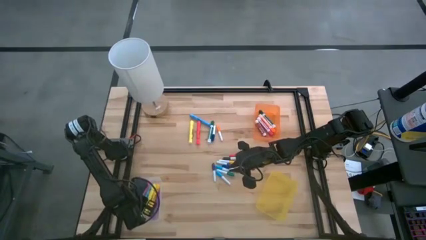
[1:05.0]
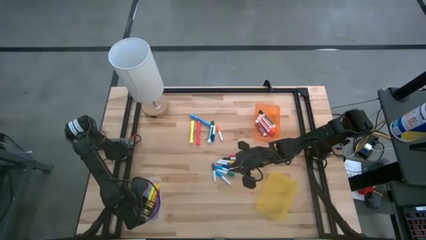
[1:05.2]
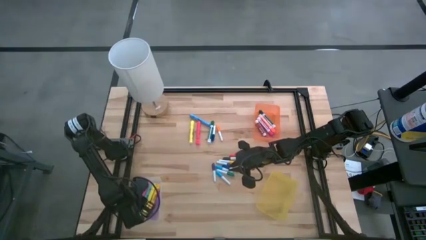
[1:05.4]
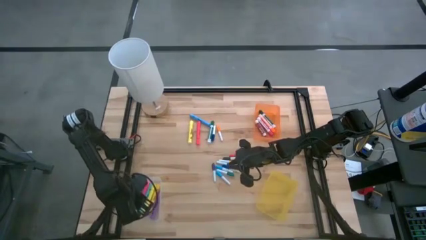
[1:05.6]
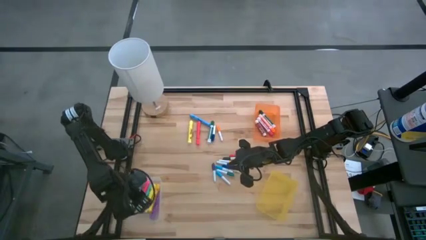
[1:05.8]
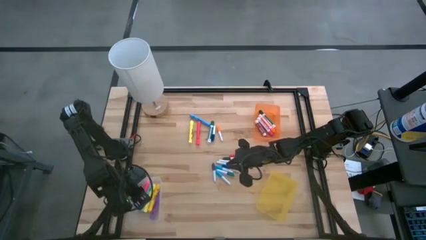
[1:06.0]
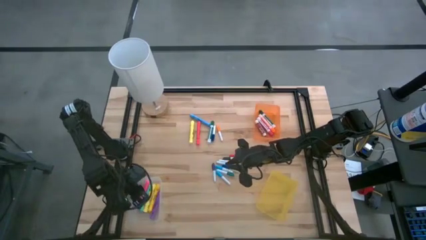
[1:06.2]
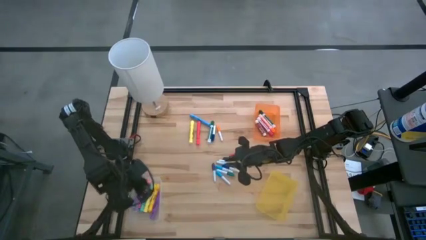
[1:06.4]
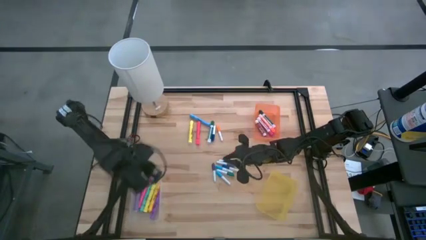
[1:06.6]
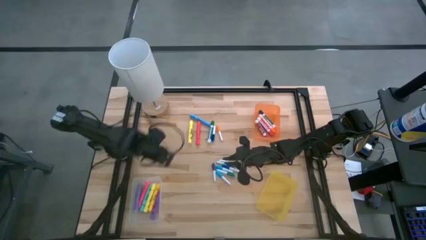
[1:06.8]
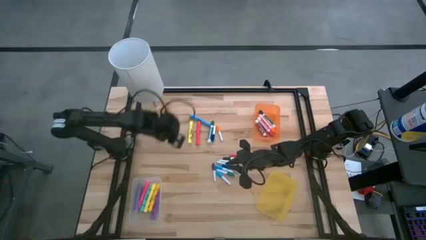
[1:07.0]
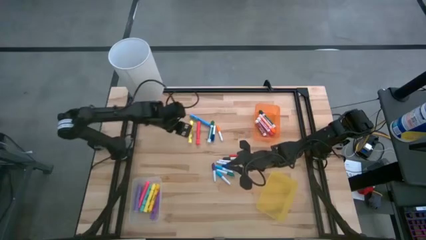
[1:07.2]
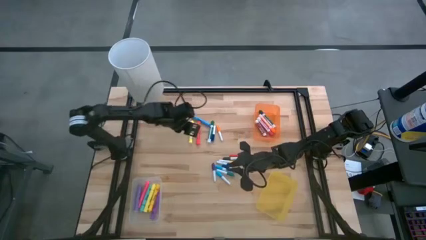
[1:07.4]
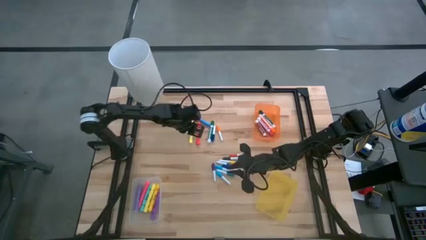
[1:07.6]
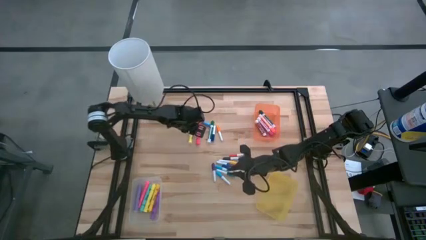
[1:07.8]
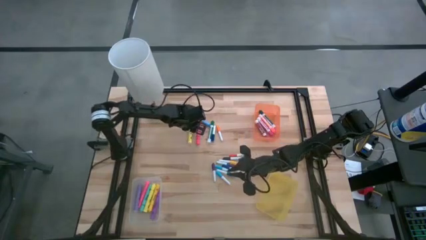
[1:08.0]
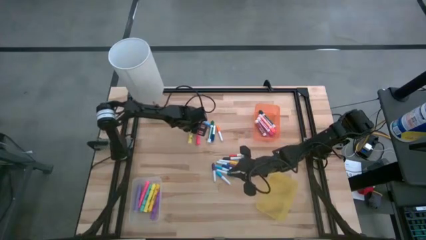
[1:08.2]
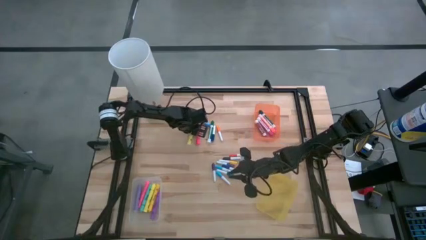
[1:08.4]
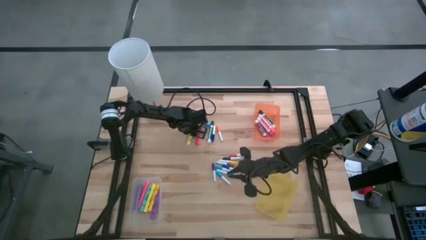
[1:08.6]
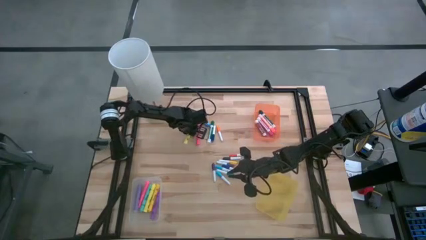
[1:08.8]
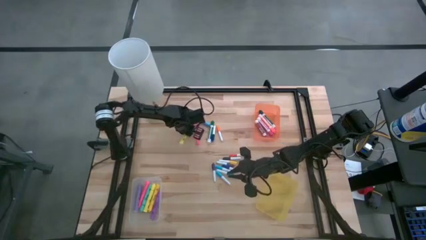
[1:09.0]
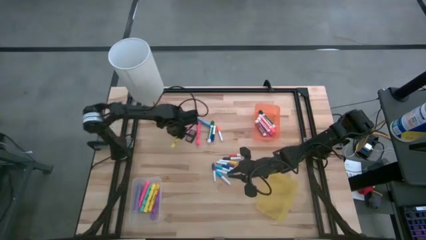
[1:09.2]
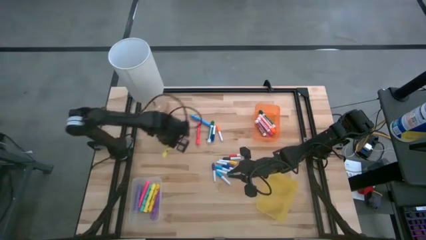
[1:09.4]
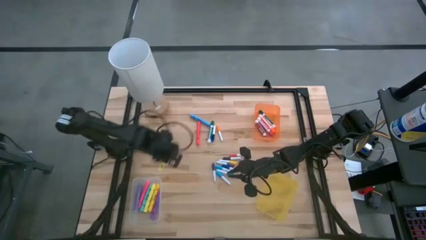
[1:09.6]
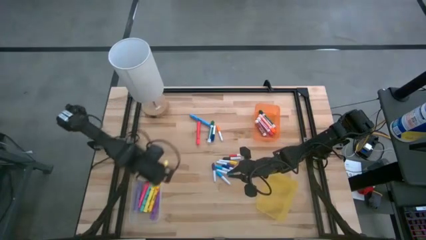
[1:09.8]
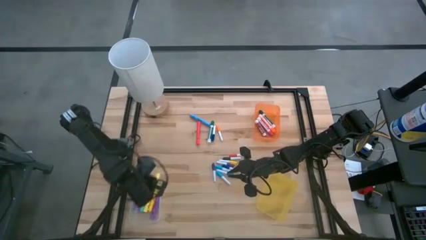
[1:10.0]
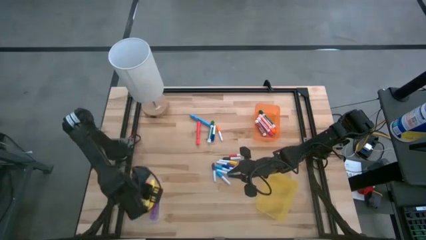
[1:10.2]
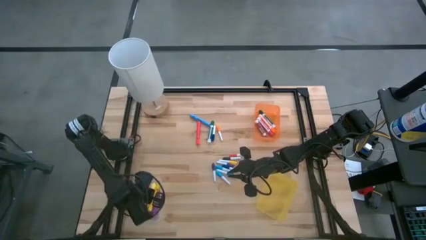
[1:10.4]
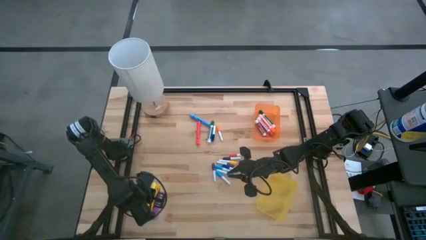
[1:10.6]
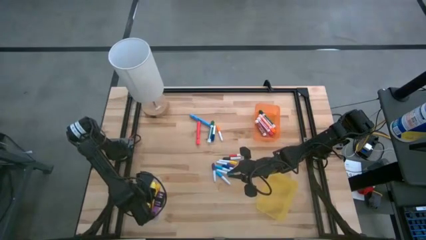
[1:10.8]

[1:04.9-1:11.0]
Task: Pick & Place Markers
Put the yellow marker pen into the transparent bin

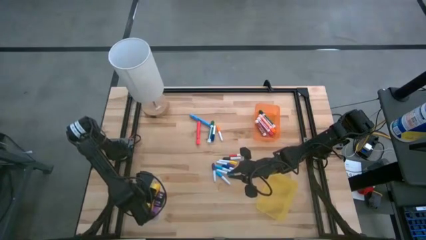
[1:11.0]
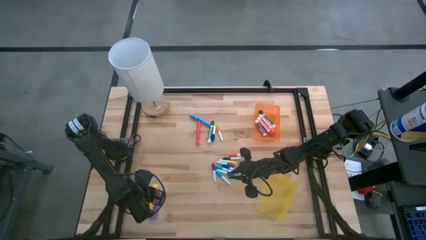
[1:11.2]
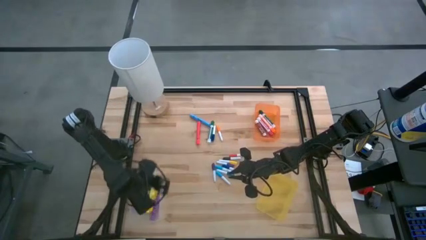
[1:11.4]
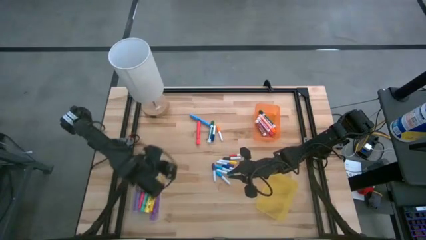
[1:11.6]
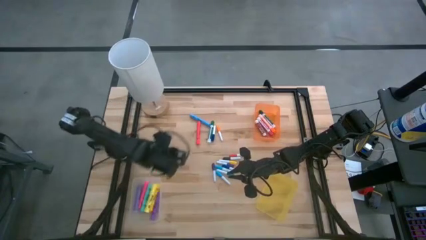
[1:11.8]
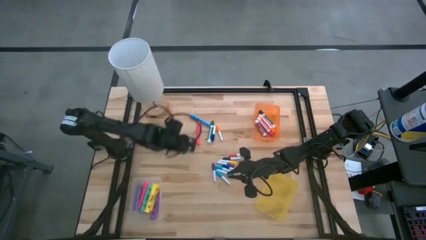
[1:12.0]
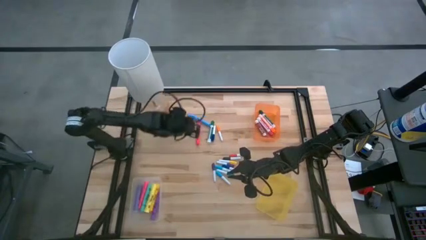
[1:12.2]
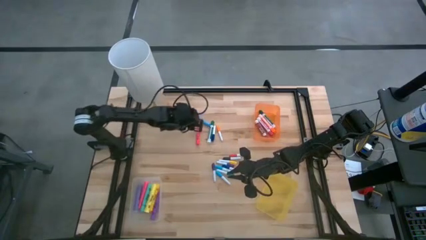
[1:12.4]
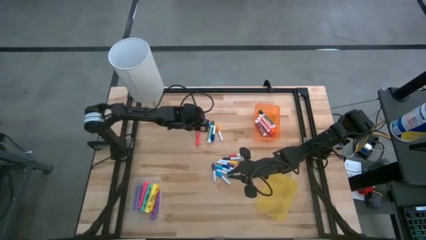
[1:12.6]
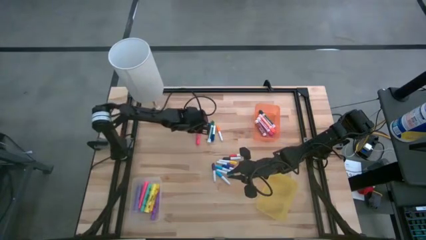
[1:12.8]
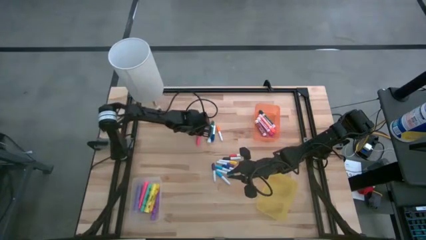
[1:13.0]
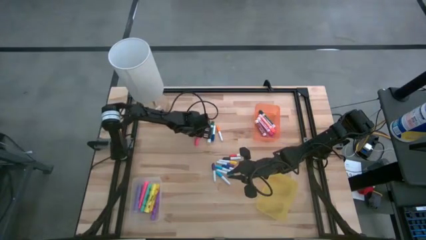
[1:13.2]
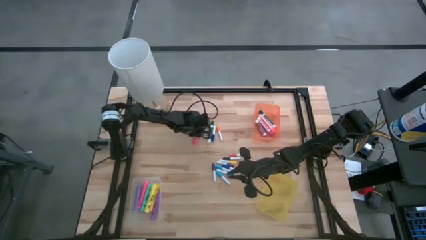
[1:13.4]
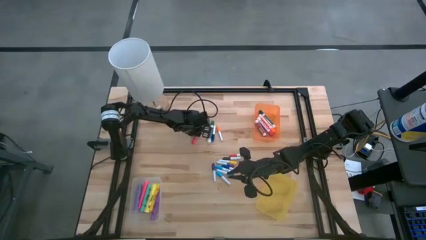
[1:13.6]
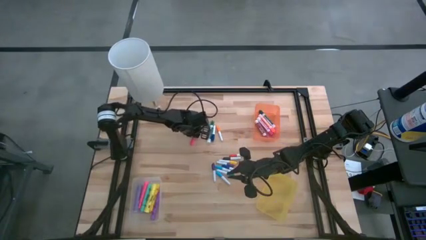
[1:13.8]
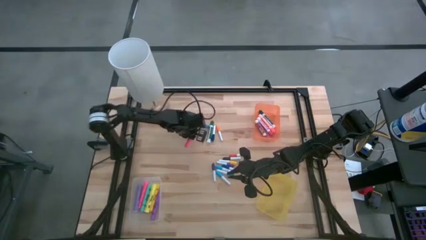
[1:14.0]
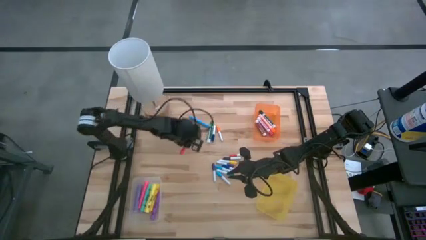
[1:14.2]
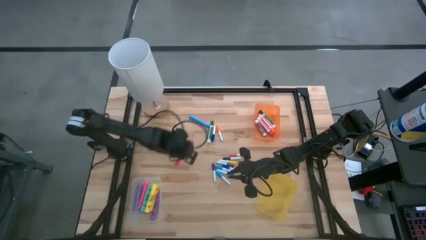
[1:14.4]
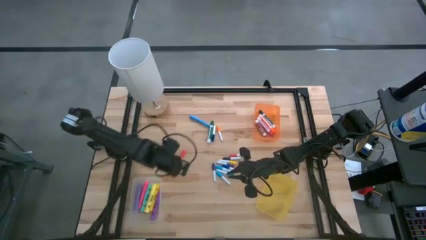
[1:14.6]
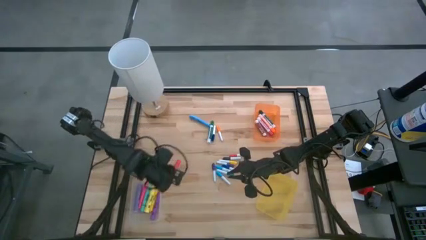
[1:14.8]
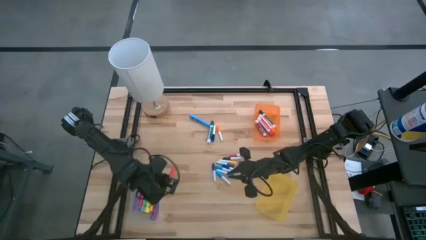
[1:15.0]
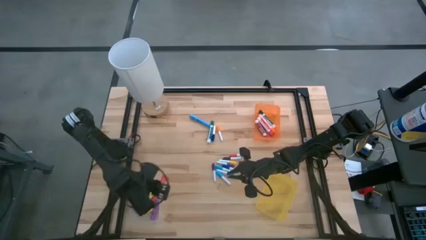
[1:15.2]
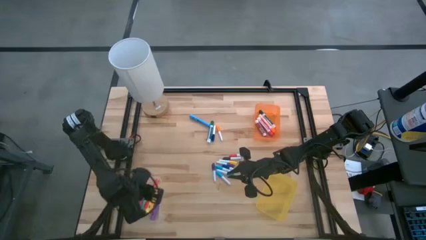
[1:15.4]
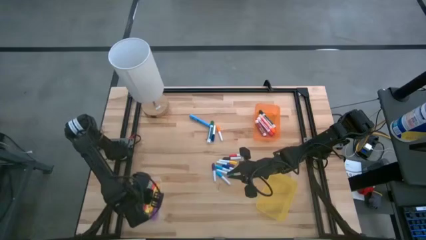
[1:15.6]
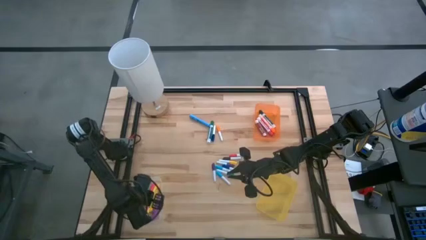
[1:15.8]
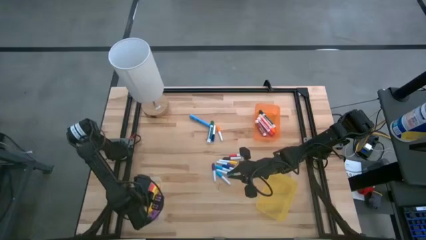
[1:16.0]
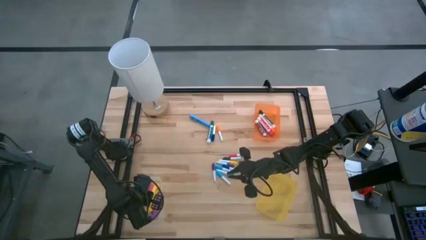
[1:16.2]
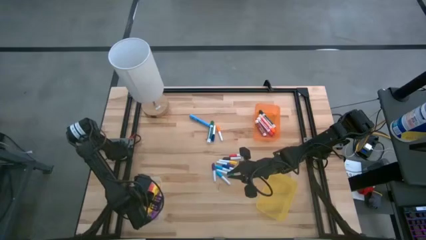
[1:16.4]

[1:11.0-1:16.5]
Put the red marker pen into the transparent bin

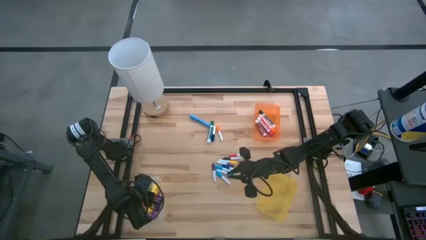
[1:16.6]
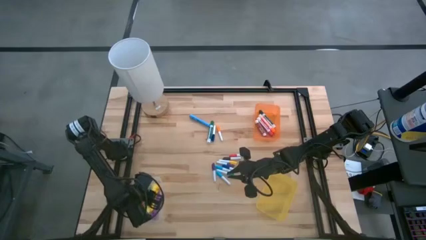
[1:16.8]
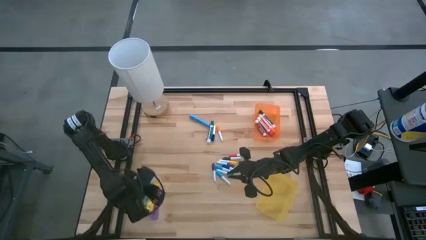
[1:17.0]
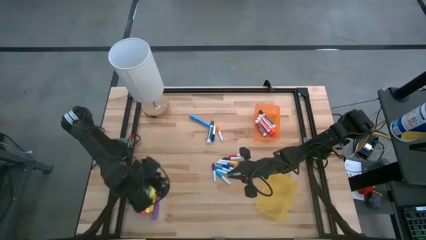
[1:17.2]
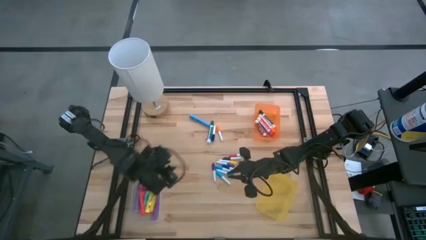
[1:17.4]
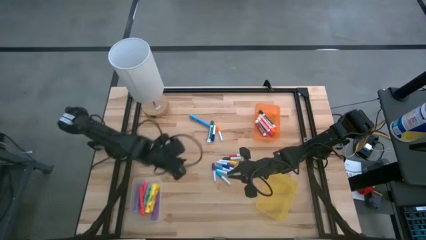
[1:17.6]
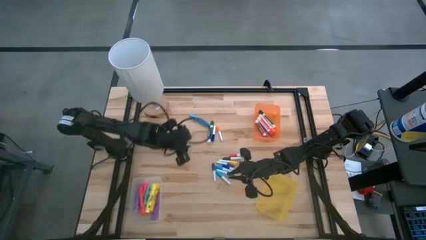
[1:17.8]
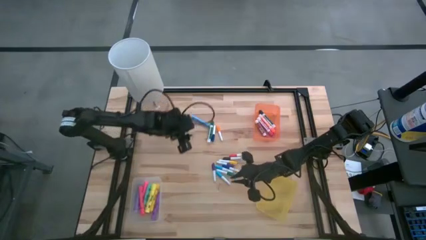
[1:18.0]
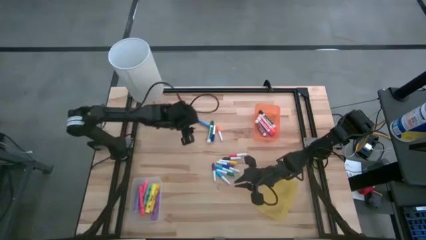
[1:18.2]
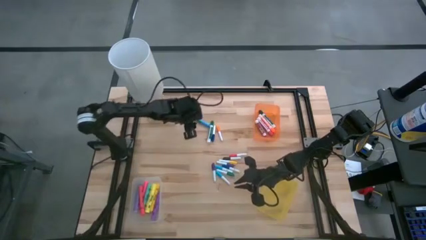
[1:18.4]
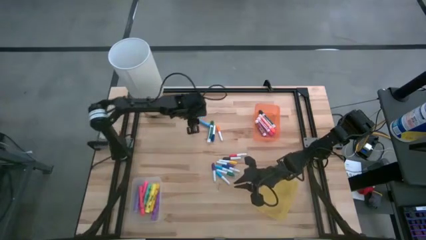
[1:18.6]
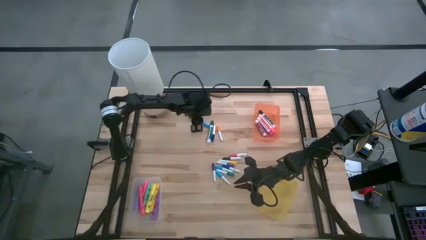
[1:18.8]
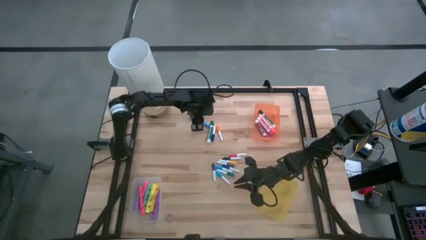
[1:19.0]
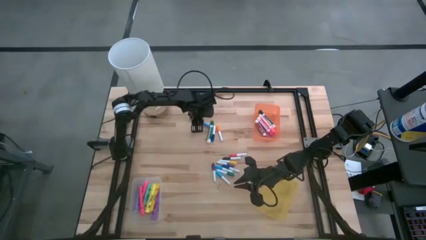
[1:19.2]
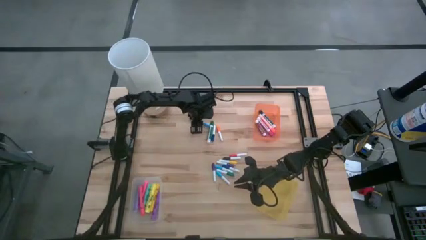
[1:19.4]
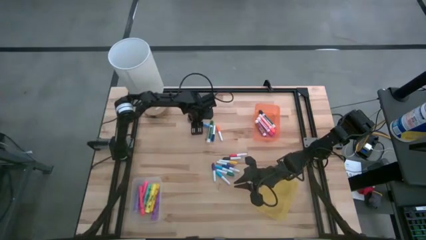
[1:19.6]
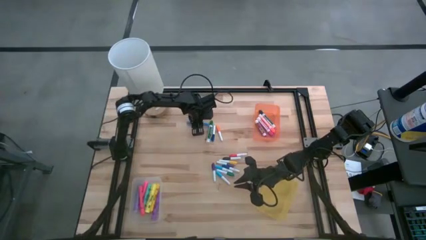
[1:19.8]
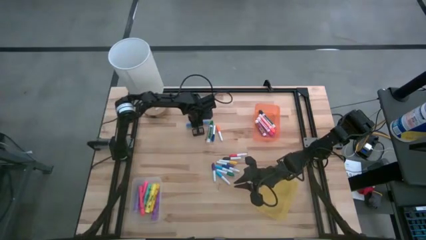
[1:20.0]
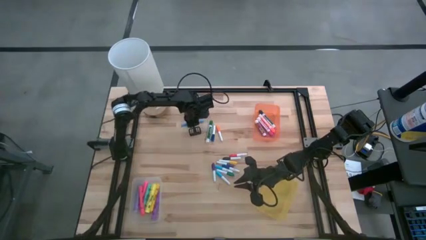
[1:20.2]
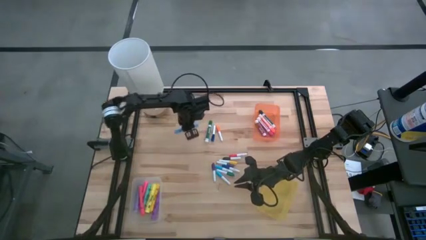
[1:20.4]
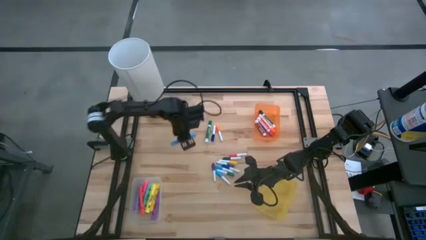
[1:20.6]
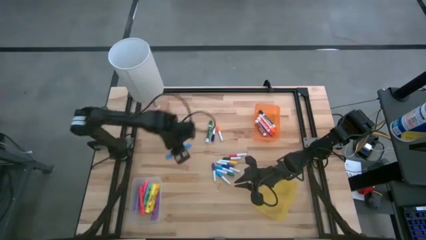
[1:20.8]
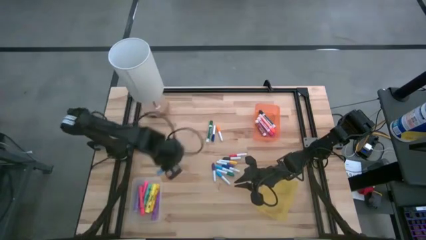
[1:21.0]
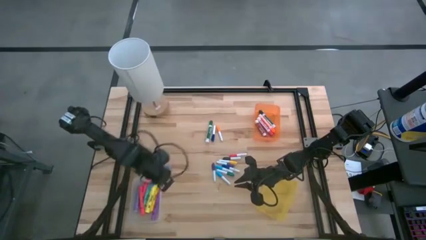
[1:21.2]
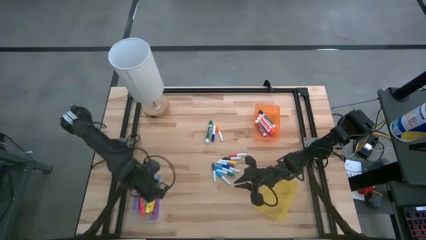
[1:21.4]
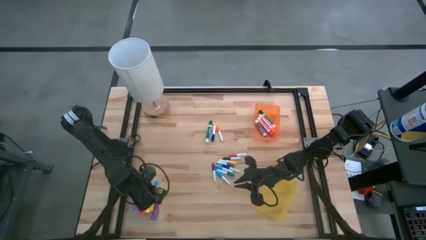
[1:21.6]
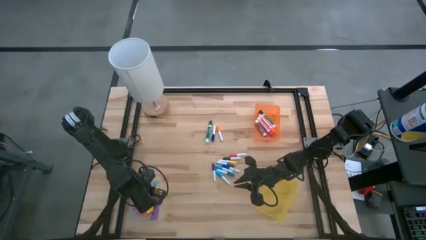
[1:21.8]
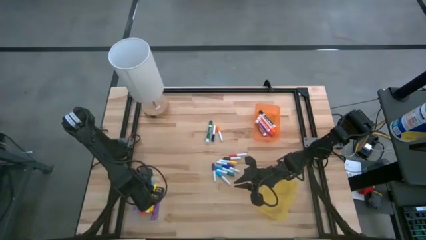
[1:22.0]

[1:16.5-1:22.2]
Put the blue marker pen into the transparent bin
